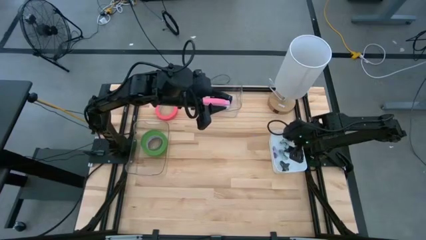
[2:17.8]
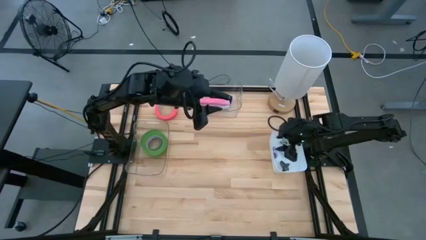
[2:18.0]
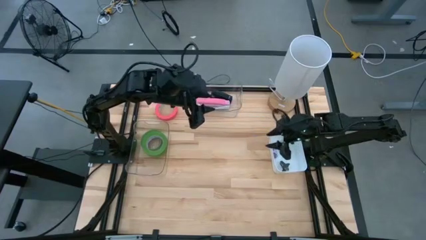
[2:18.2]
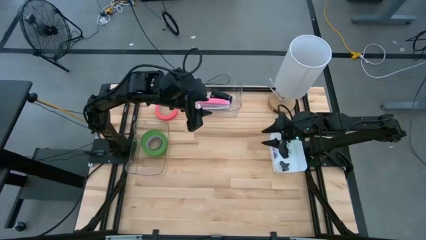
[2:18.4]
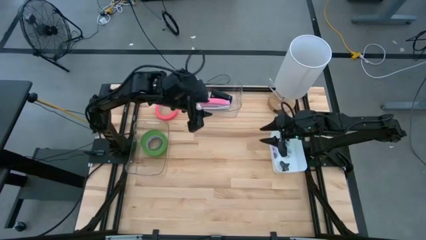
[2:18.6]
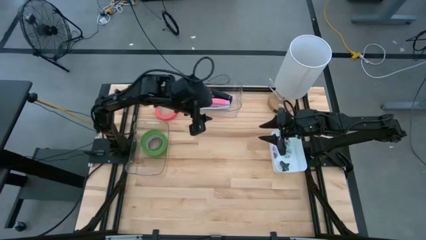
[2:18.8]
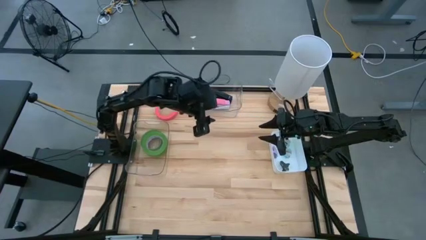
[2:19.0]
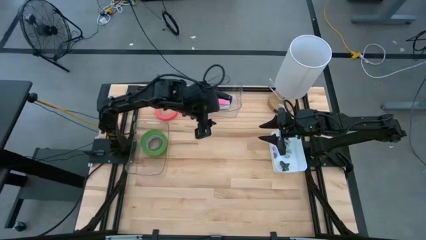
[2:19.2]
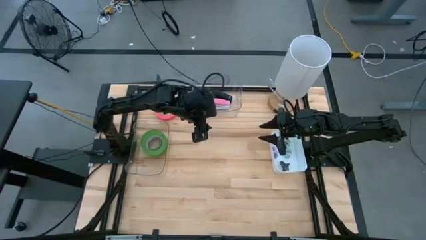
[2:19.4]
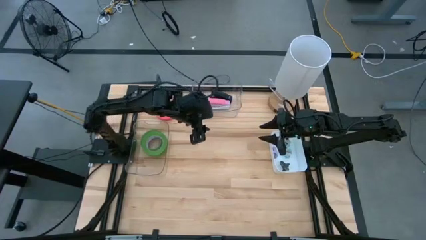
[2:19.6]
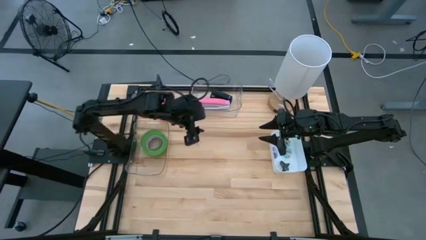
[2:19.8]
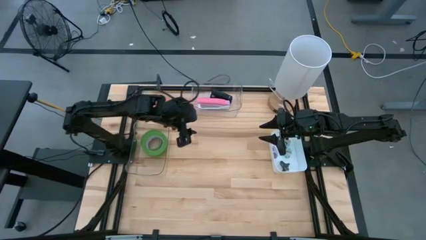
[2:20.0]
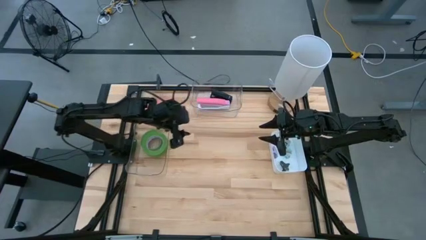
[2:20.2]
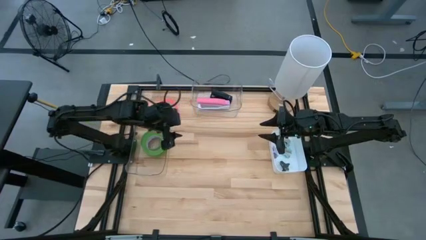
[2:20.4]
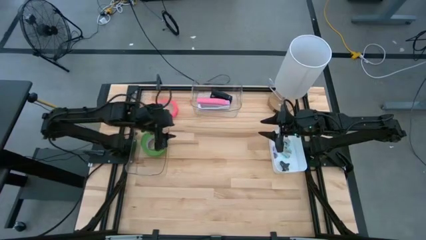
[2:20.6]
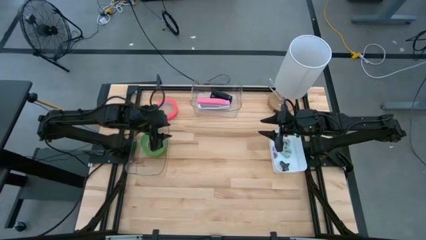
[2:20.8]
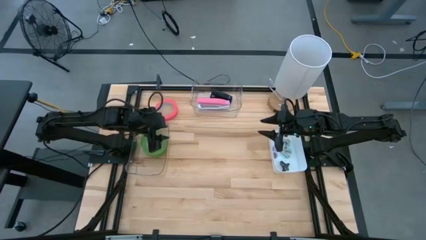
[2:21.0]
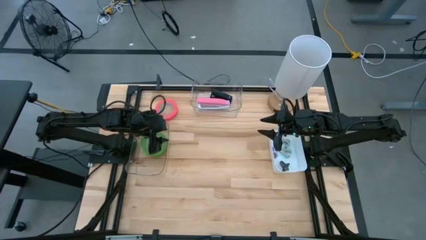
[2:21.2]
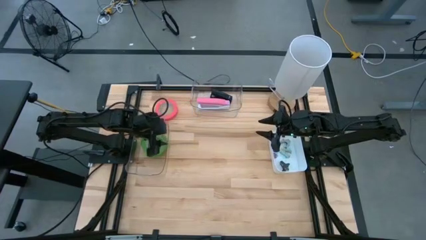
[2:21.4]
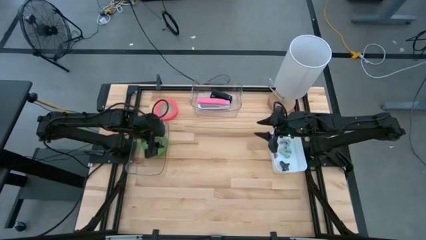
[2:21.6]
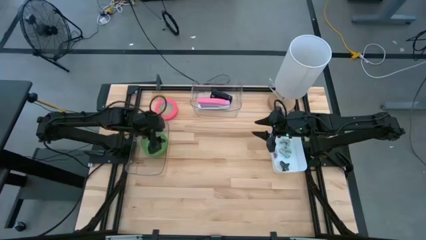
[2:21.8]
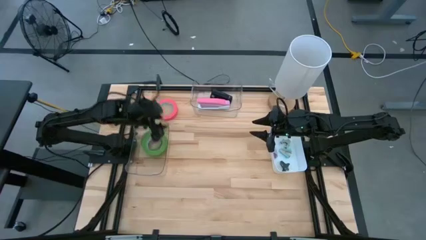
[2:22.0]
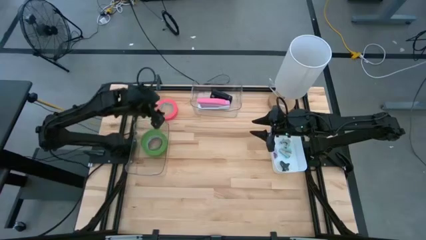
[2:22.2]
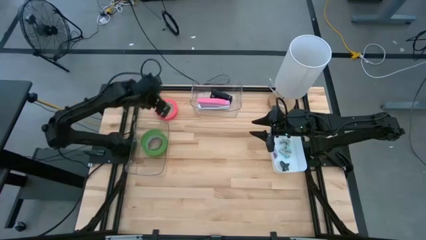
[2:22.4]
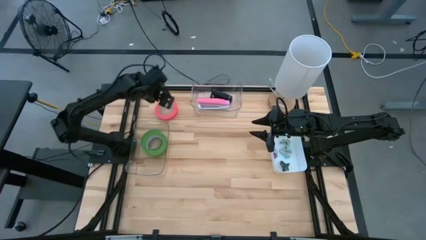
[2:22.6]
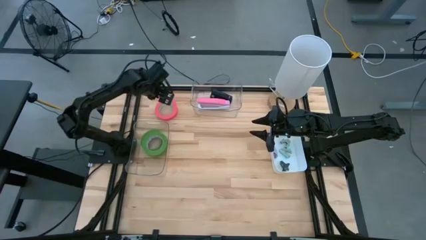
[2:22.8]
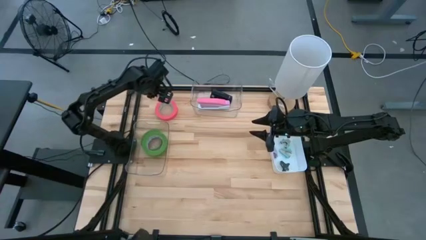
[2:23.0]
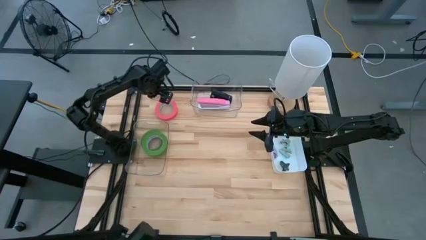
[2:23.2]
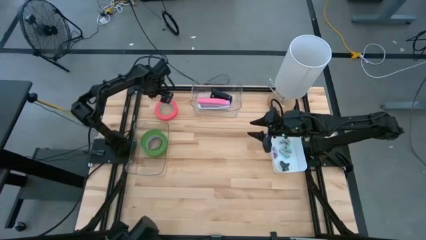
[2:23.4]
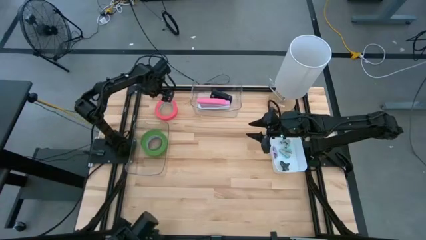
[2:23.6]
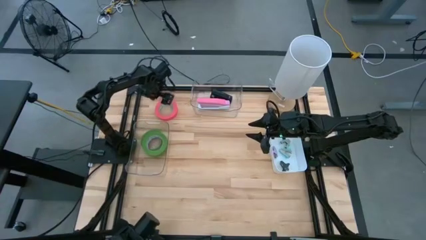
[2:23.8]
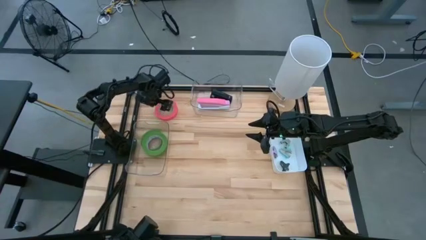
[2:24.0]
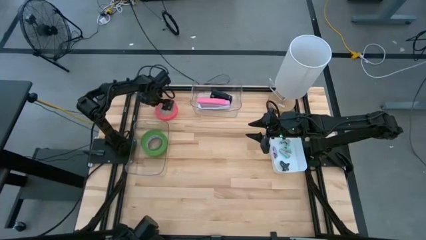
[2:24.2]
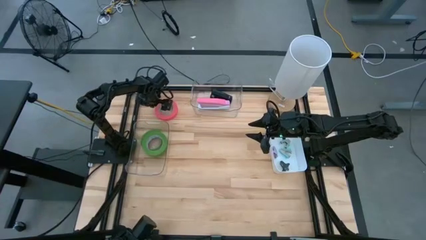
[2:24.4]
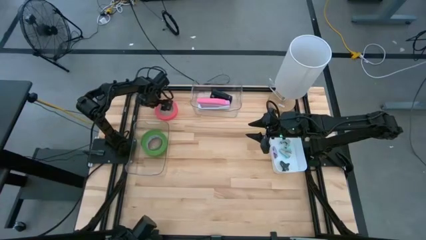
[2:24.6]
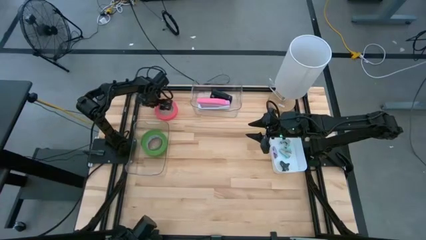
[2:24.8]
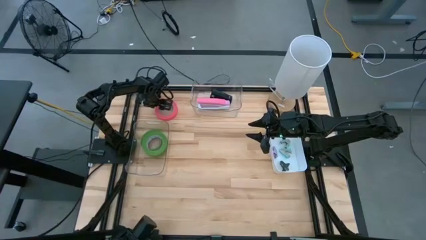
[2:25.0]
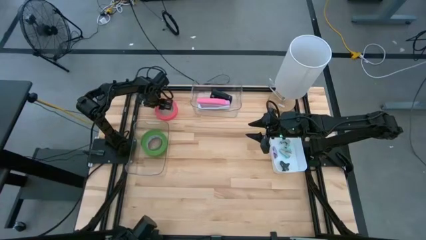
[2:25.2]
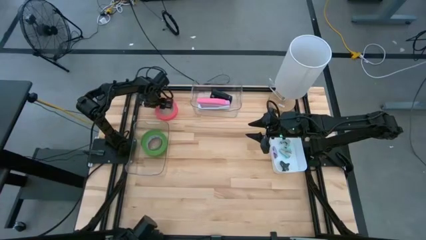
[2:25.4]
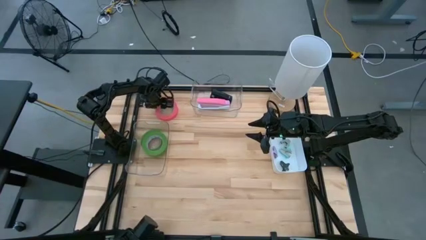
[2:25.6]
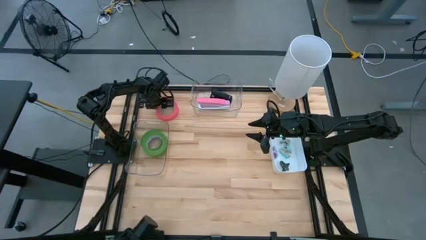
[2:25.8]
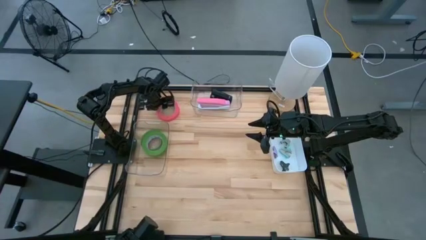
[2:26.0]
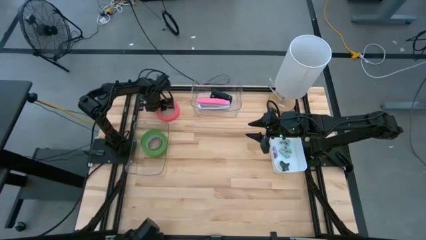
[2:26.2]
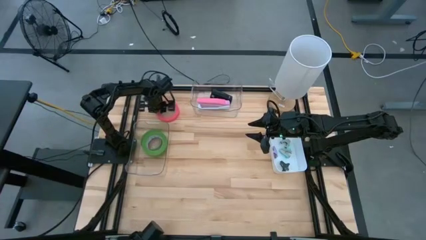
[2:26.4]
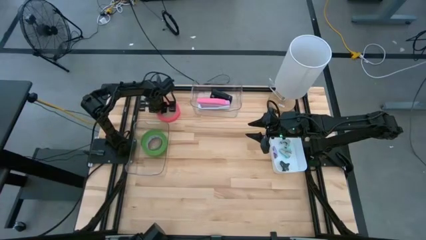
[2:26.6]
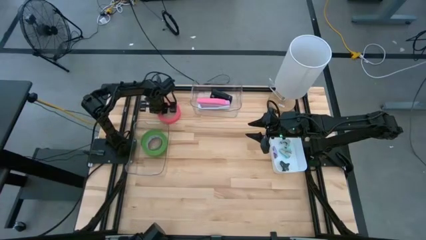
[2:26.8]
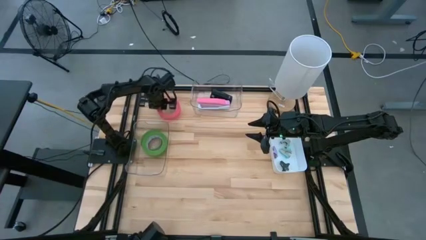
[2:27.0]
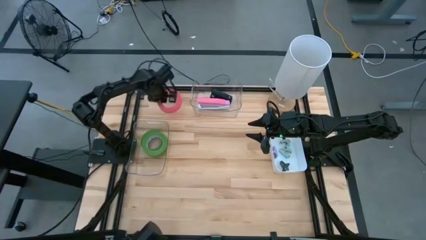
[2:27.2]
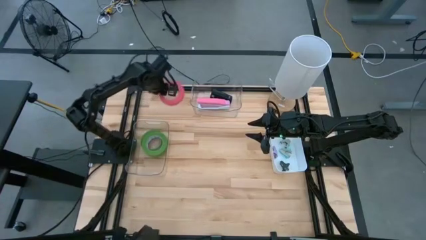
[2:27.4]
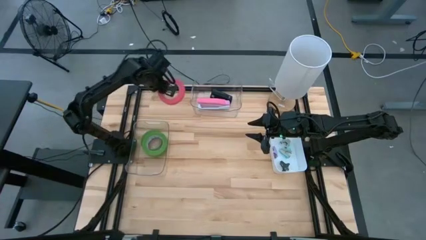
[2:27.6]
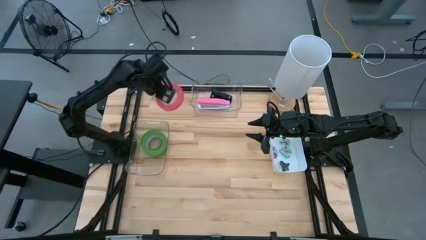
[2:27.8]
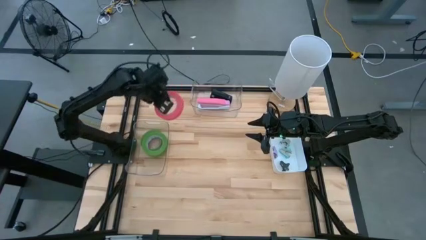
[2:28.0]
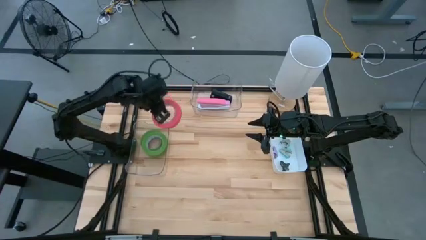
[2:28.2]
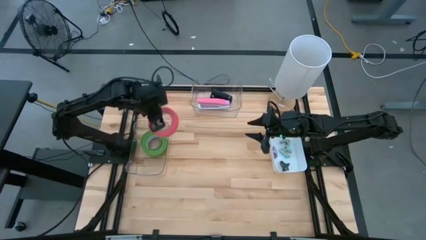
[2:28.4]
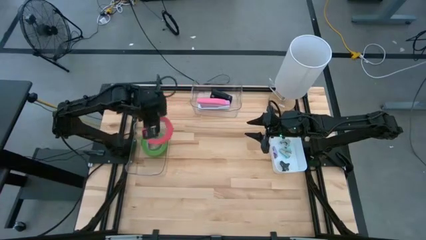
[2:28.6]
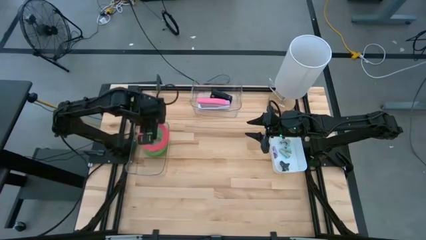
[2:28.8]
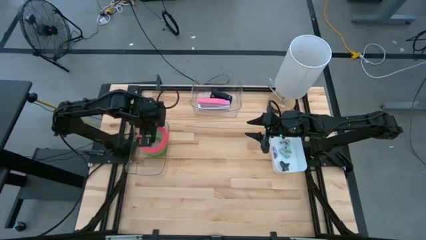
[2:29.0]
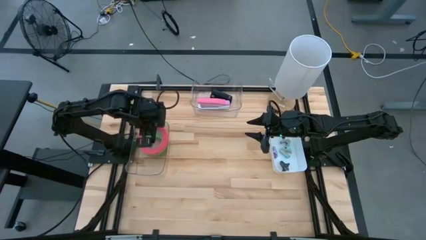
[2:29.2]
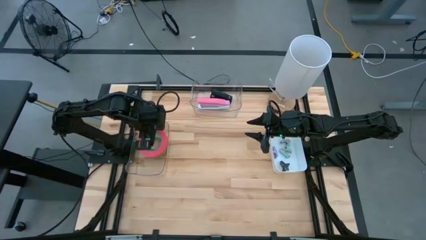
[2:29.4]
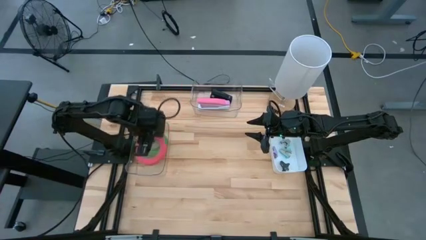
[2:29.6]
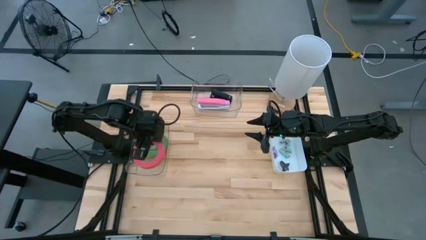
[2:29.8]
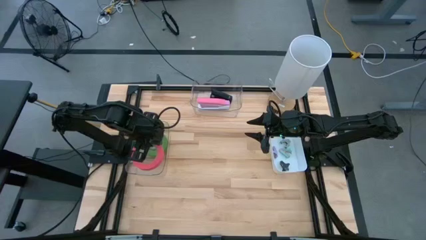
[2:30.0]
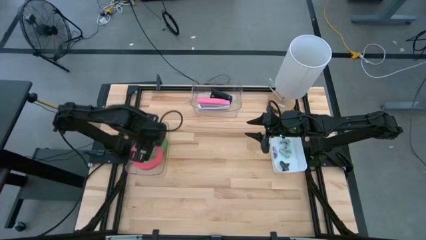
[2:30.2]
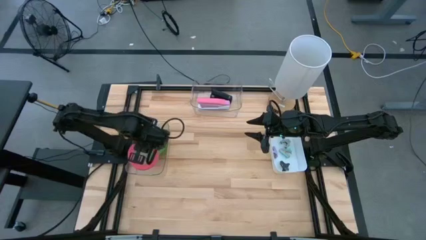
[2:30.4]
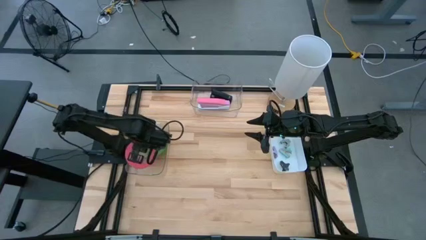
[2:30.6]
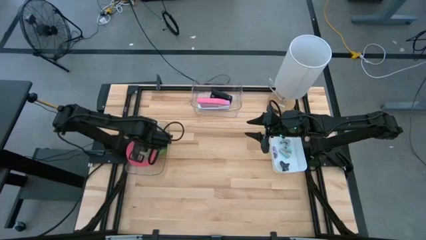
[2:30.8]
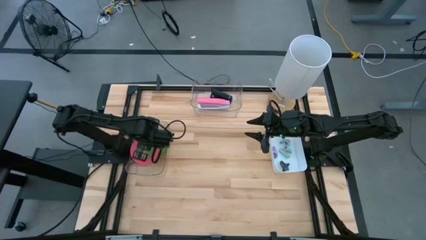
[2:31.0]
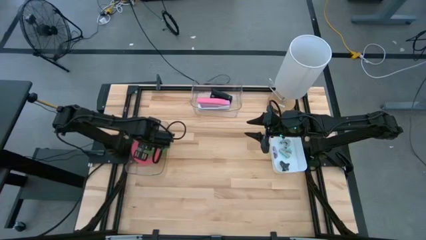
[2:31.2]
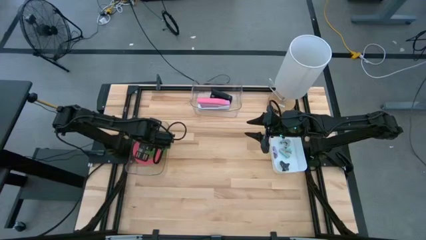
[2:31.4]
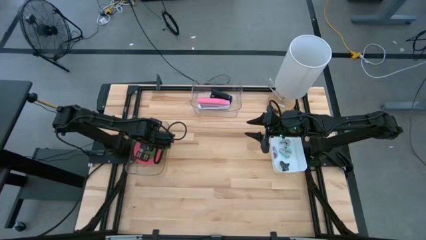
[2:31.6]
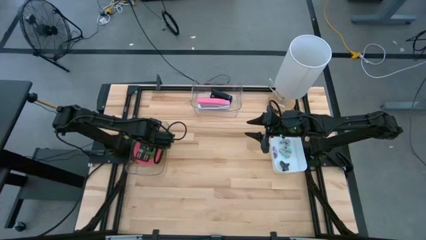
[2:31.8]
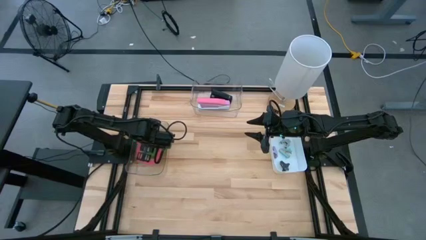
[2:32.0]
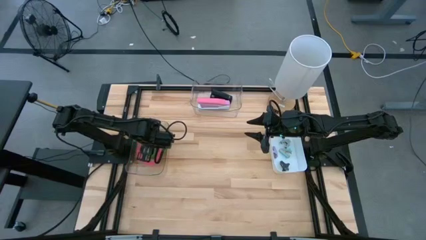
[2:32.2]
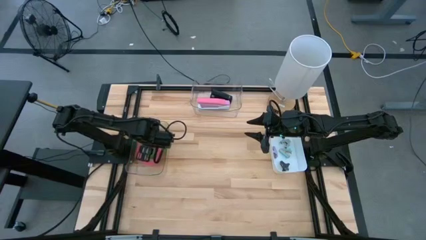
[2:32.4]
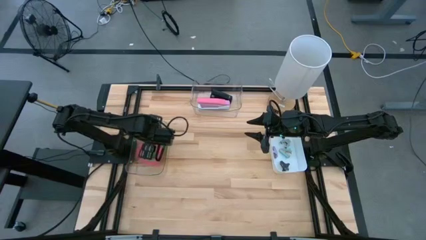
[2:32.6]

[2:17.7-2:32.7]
Task: Pick and place Stapler, Stapler remover, tape
Put the pink tape into the bottom transparent bin

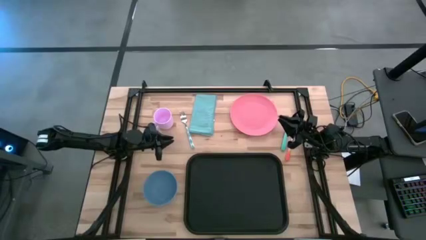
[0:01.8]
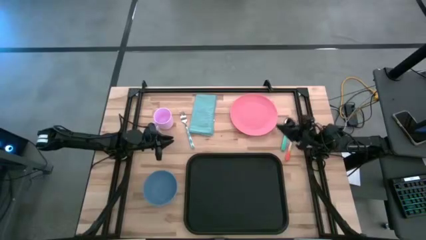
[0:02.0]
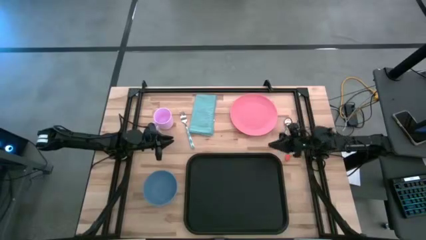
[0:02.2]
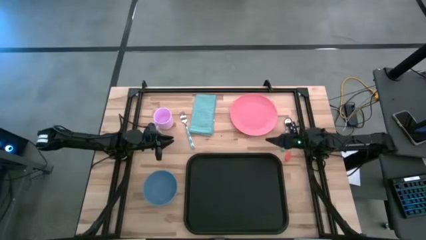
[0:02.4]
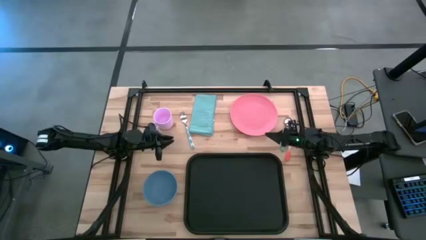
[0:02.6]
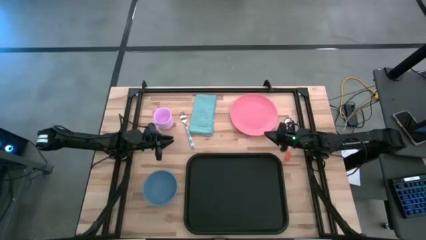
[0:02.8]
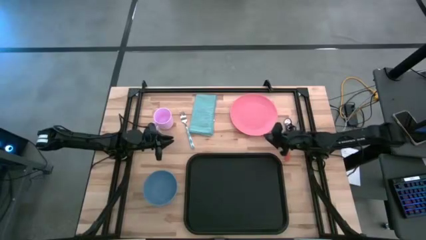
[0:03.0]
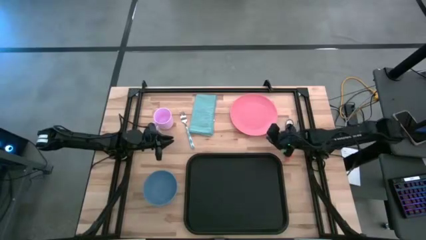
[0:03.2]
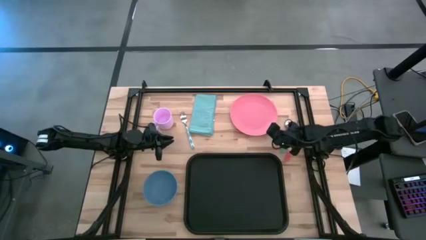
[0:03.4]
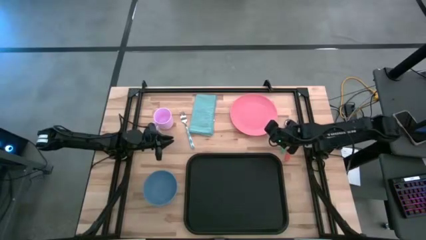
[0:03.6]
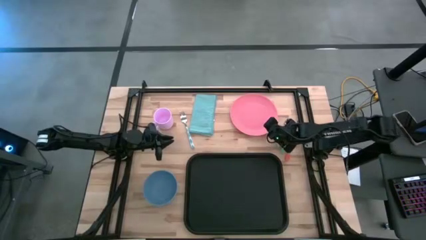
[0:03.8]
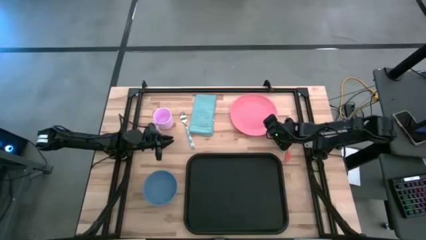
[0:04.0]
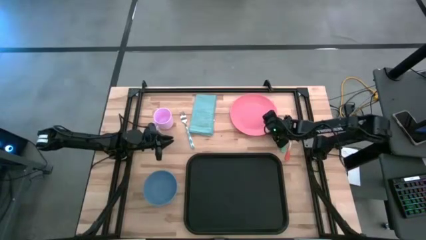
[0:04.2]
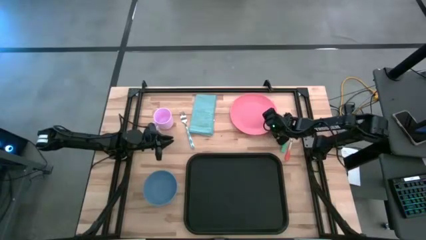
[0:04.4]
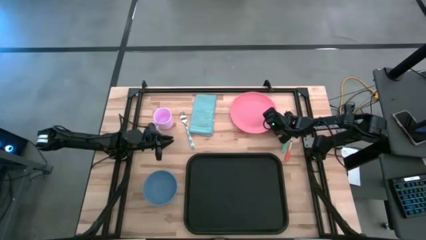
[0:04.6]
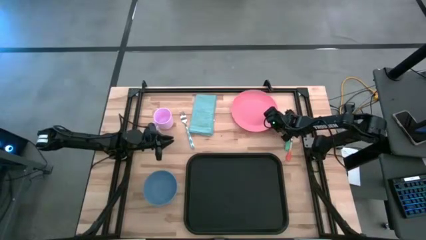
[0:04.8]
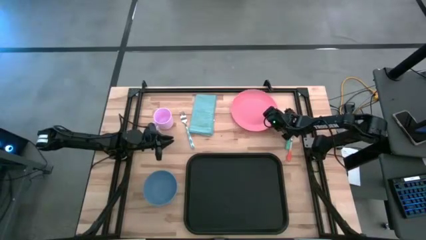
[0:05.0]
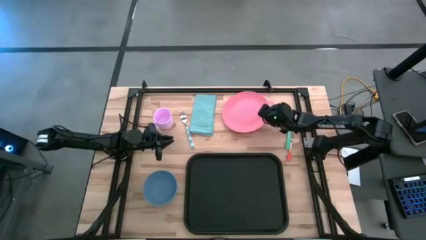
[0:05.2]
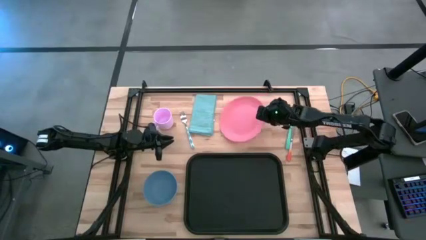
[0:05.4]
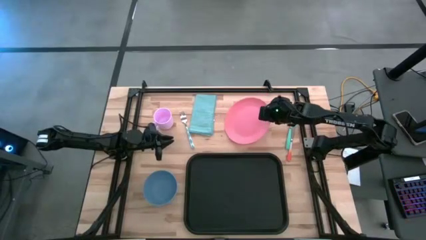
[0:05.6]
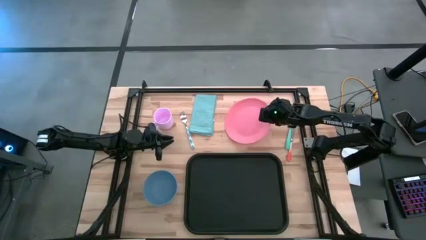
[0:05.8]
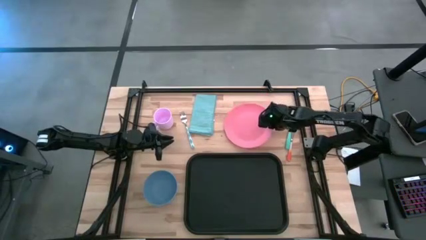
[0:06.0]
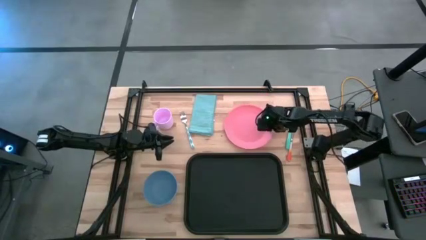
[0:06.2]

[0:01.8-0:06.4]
Task: Set up tray
Put the pink plate on the black serving tray
